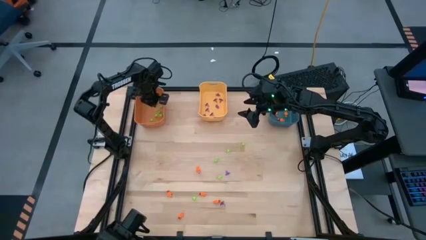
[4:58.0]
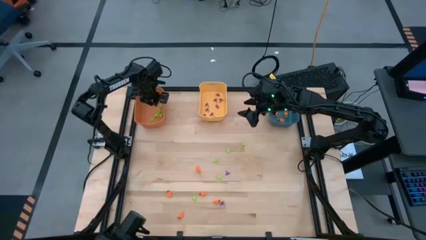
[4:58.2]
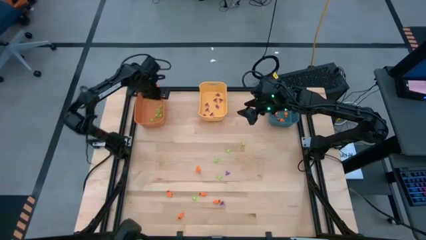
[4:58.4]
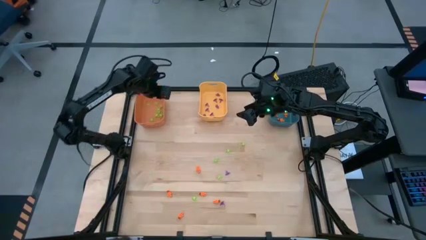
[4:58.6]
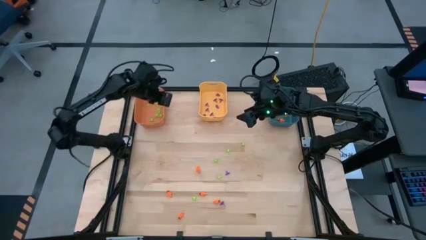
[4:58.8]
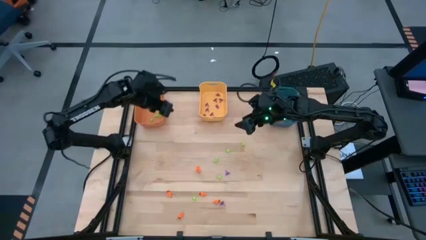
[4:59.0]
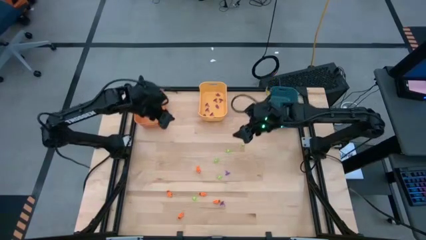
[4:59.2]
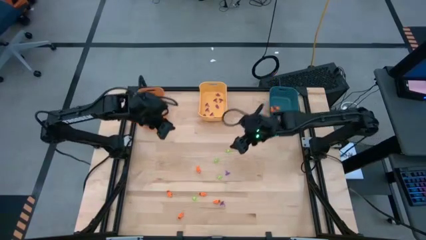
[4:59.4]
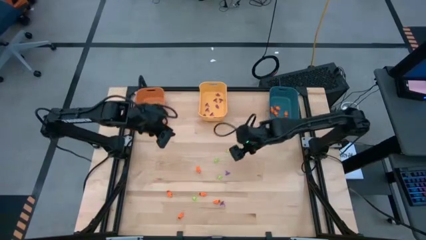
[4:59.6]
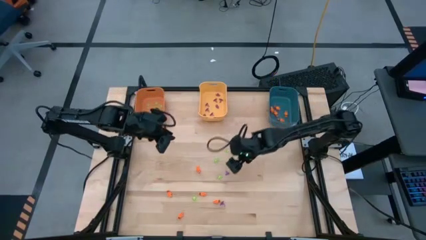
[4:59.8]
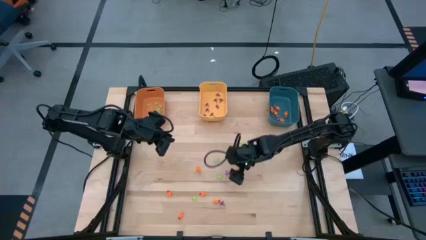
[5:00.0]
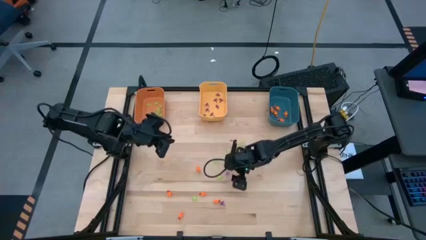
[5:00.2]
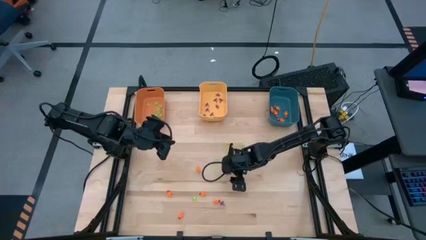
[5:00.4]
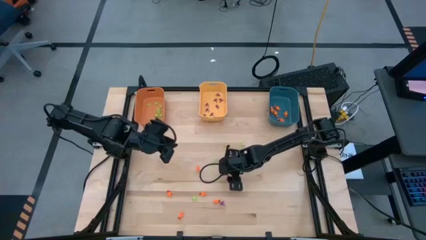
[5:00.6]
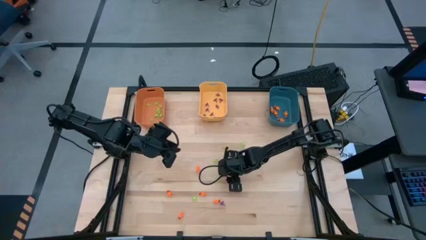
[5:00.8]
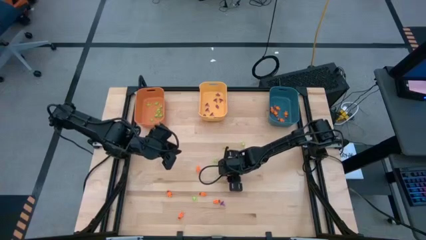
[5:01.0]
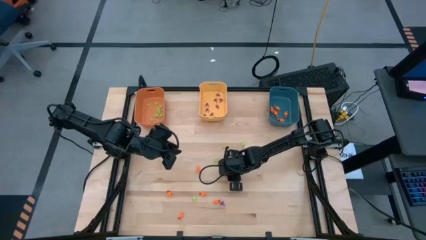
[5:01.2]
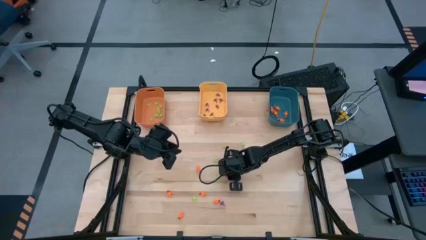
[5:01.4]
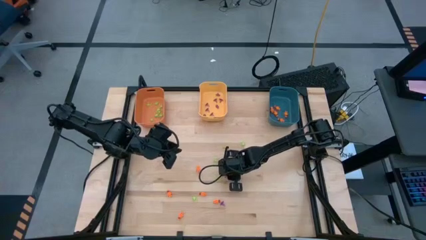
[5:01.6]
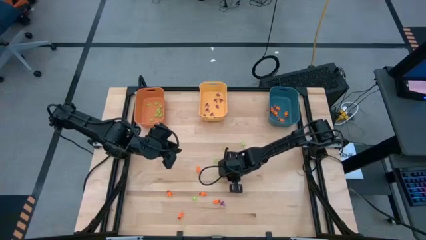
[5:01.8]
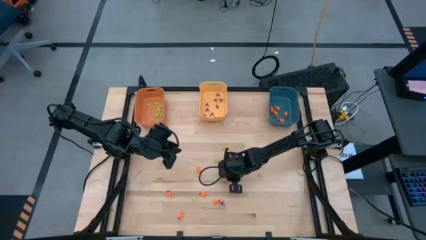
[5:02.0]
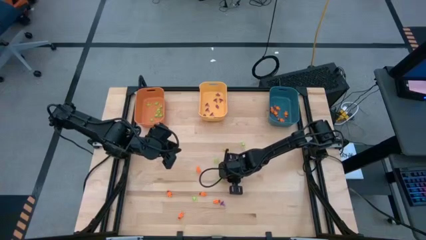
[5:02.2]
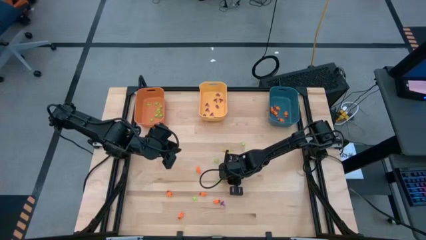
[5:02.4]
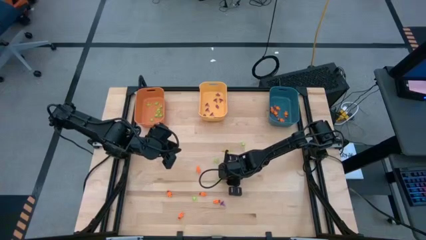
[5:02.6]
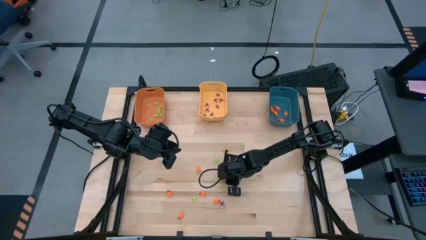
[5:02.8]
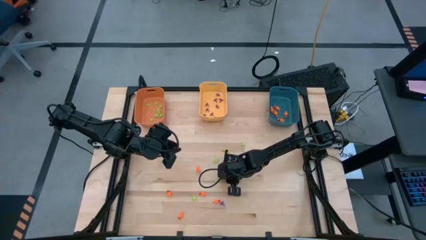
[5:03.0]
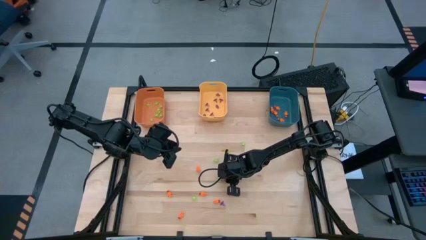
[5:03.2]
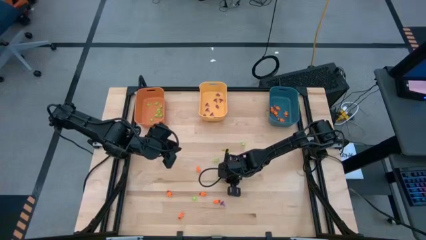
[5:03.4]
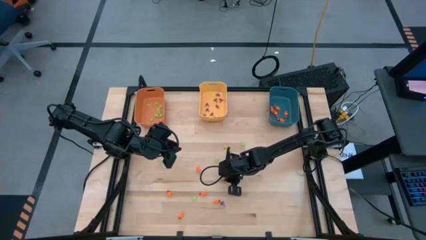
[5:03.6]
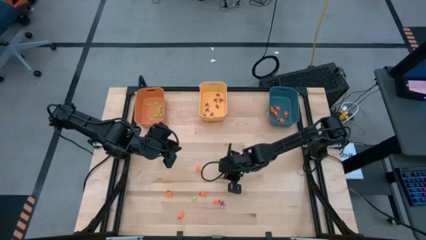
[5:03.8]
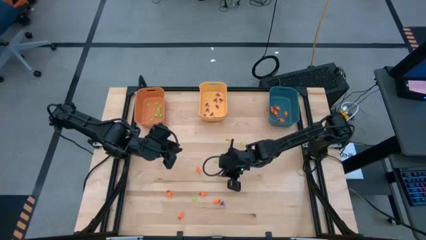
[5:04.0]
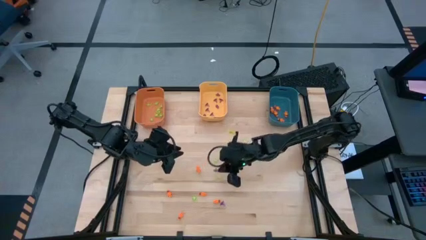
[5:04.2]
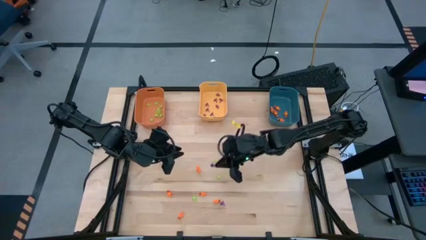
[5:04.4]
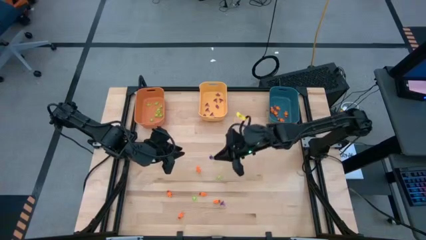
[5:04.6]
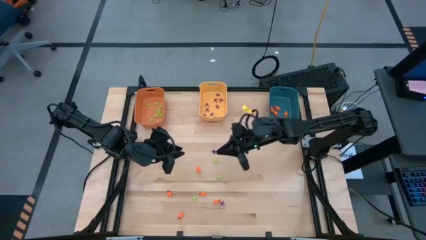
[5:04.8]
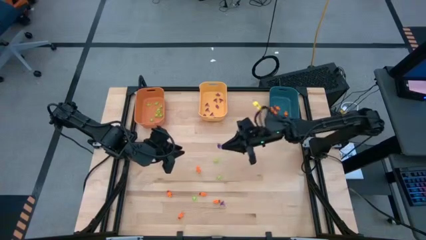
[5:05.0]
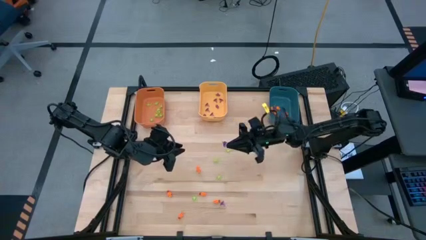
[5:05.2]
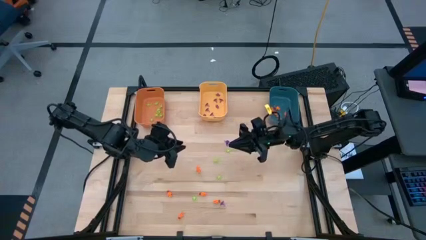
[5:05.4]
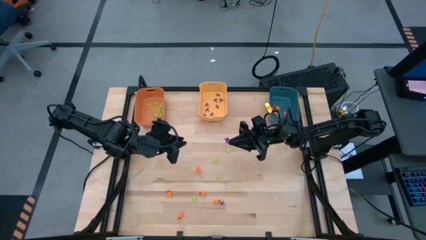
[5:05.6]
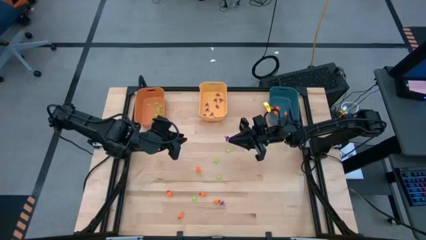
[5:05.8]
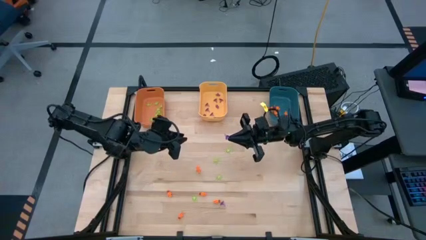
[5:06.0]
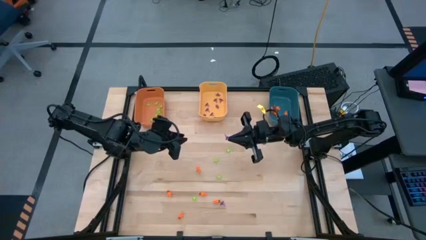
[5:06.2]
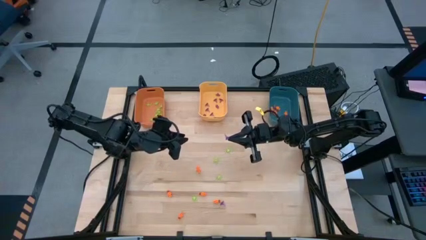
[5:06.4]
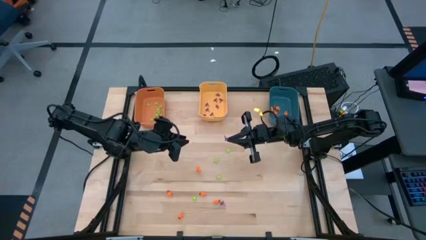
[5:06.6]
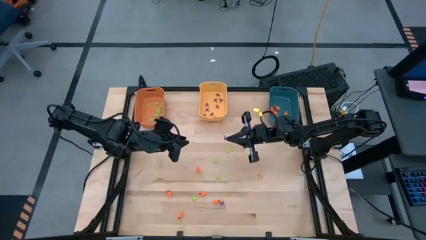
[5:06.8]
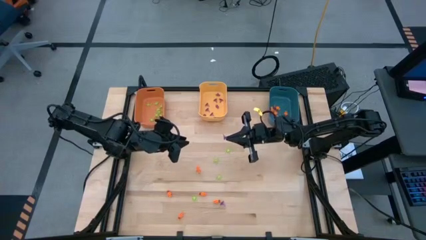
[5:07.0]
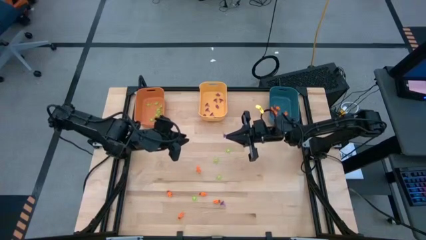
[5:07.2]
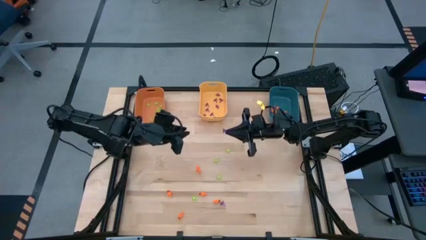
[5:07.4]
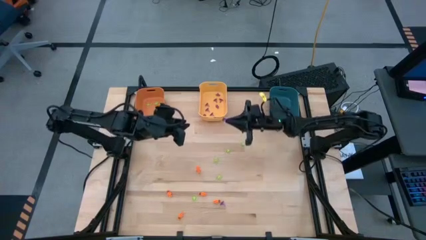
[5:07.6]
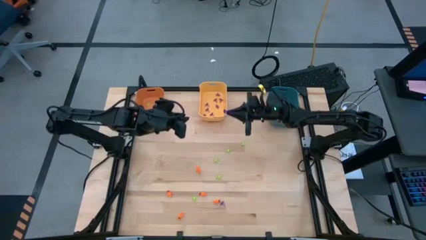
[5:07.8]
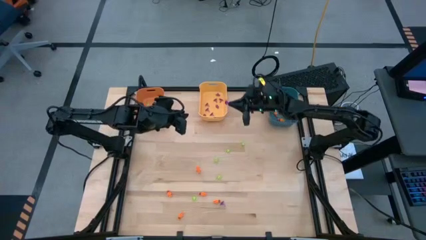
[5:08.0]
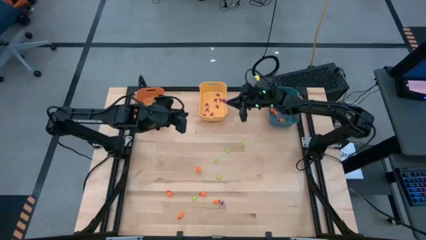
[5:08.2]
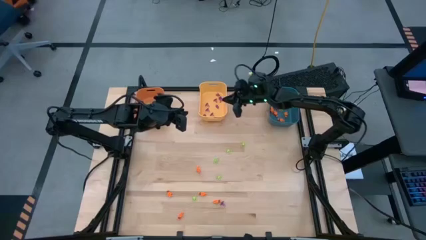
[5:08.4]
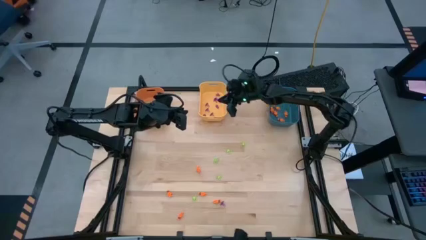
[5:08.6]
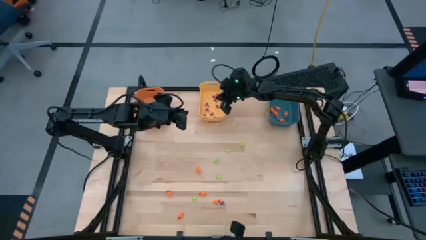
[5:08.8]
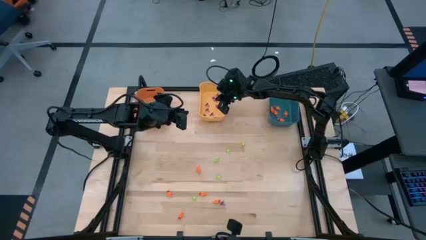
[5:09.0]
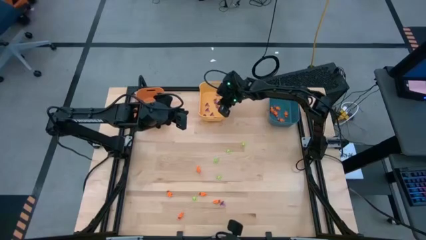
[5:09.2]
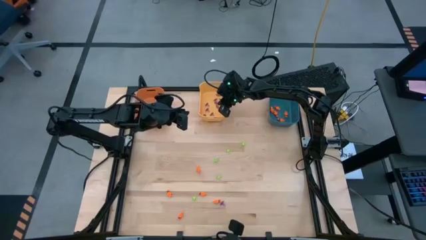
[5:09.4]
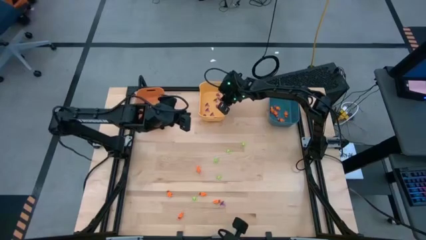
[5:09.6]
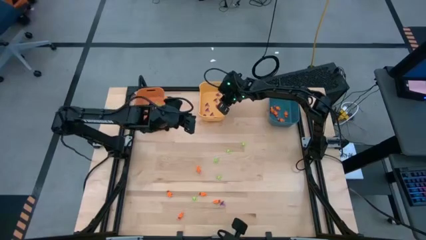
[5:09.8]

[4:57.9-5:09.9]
Task: Sort Halloween decoration
Put the purple witch hat toy into the yellow bin

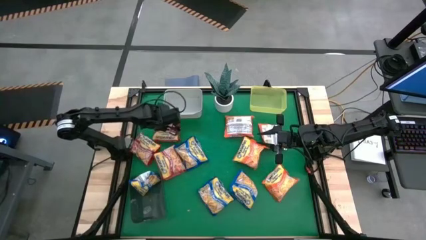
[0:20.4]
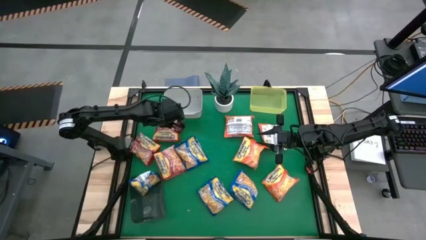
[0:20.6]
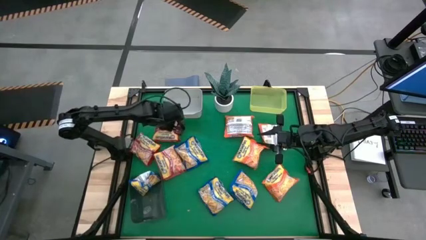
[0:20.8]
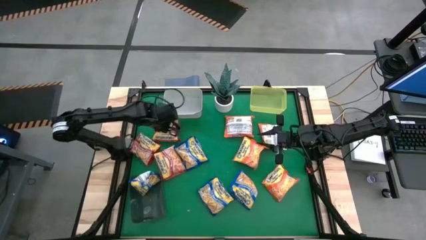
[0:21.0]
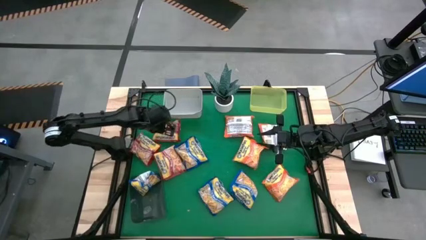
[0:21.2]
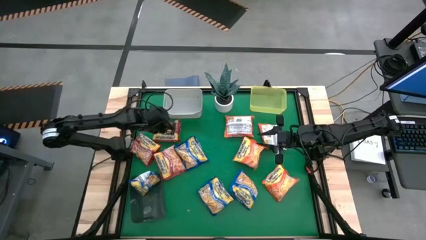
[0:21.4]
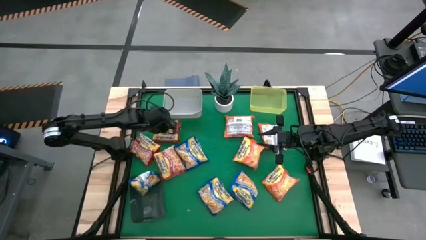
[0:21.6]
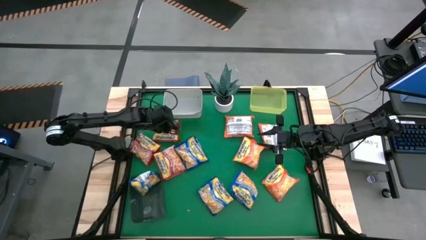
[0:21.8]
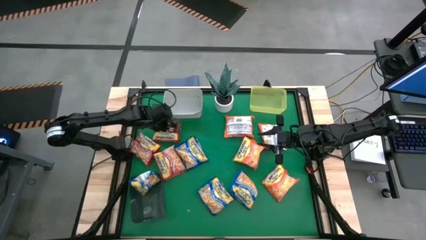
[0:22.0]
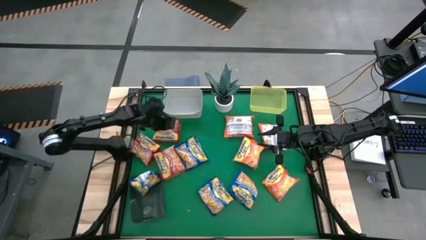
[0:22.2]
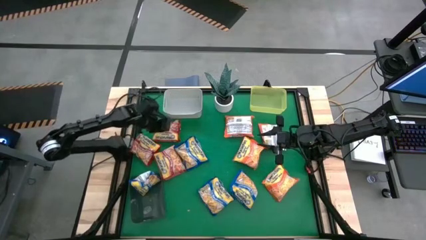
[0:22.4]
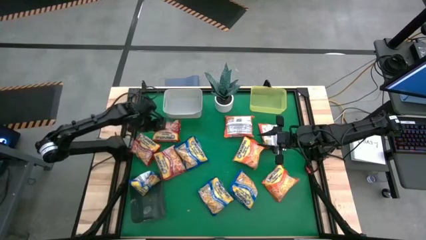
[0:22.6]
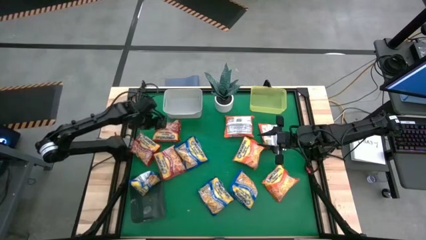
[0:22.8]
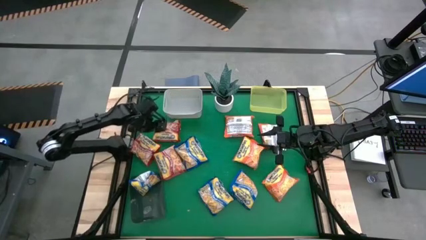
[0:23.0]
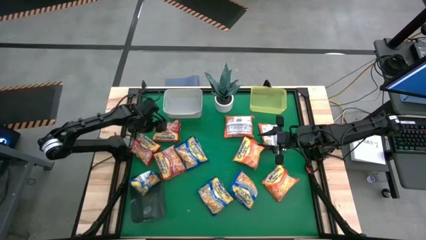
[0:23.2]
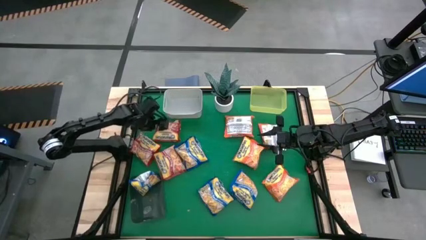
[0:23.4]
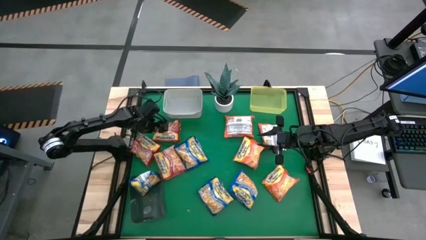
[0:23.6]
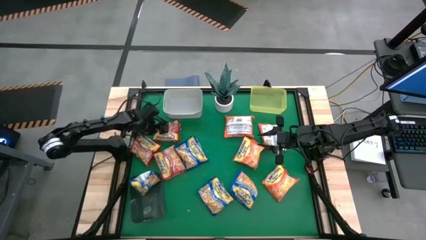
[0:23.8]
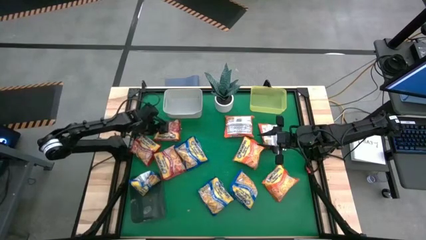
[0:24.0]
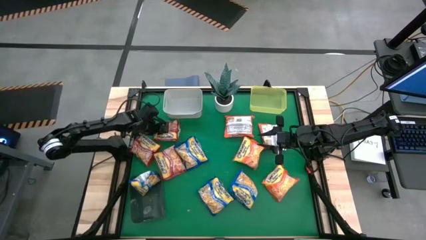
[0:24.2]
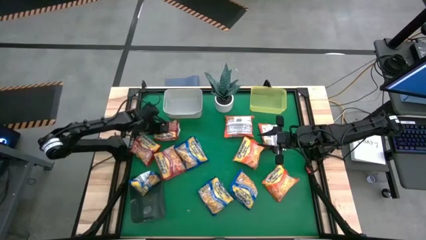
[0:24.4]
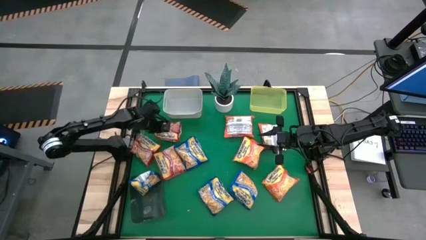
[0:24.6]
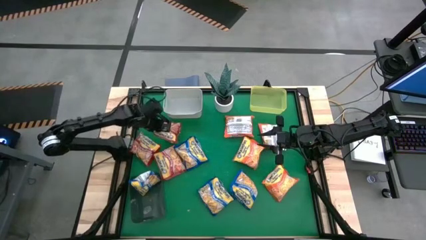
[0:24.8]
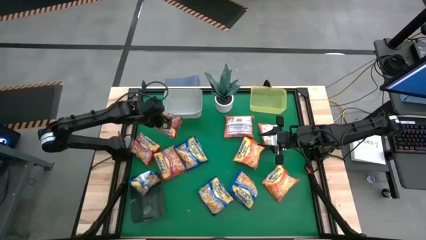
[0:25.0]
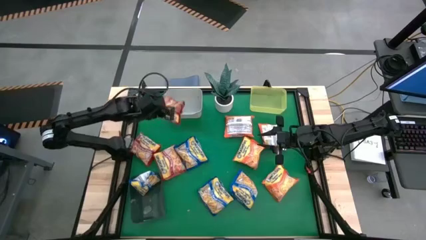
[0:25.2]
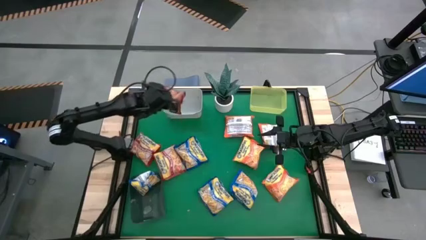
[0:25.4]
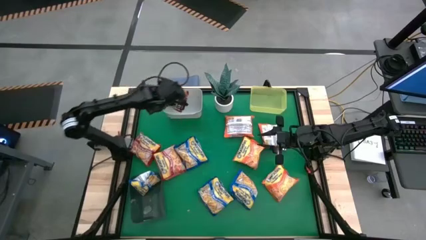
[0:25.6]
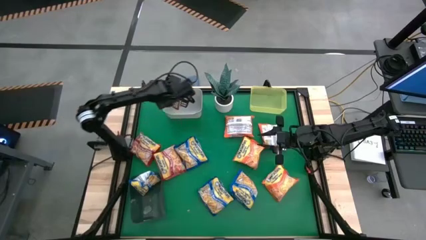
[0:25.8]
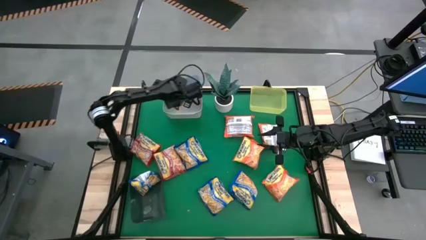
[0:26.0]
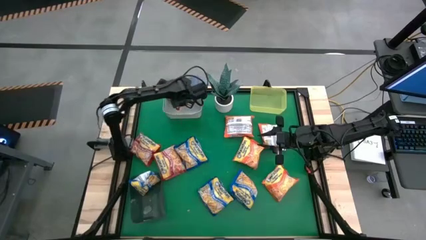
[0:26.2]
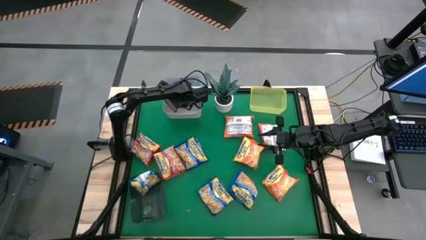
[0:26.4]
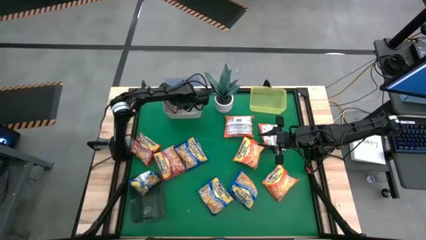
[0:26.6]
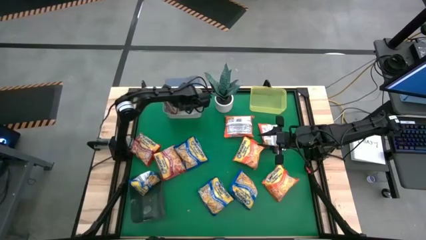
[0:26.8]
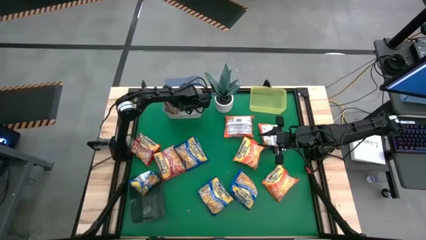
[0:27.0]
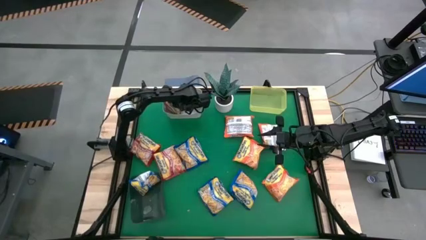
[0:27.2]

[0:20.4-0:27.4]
Task: Sort Maruchan noodles
Put the top left red noodle pack into the white bin
